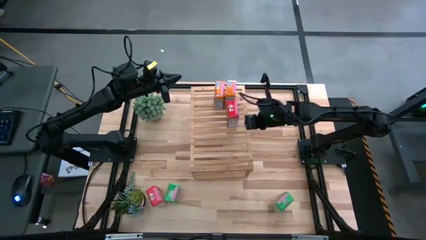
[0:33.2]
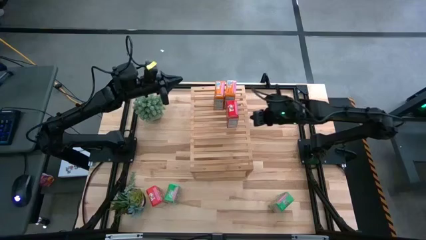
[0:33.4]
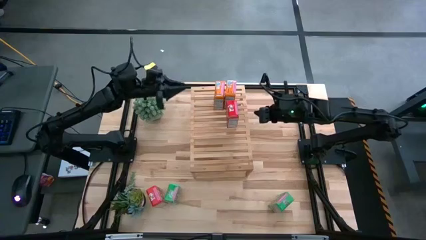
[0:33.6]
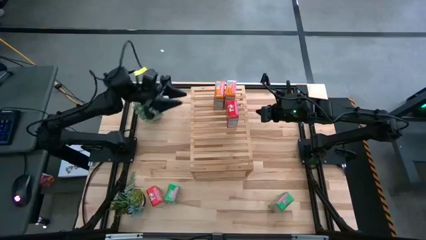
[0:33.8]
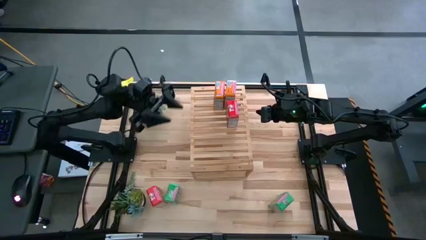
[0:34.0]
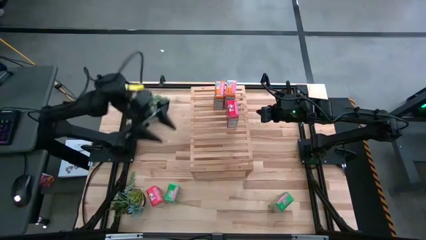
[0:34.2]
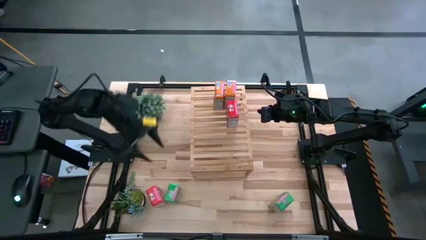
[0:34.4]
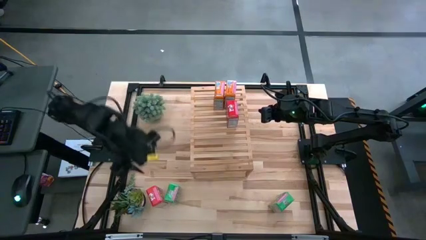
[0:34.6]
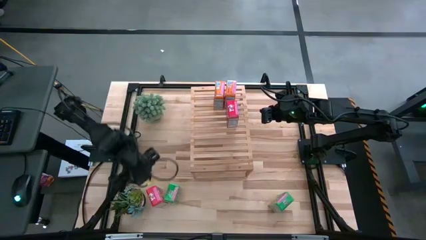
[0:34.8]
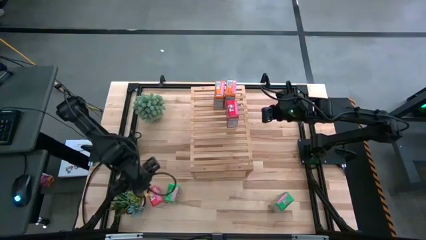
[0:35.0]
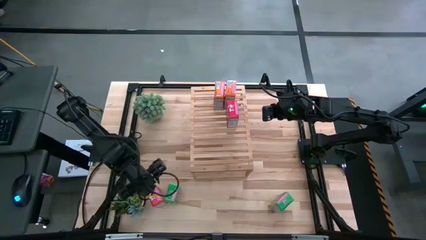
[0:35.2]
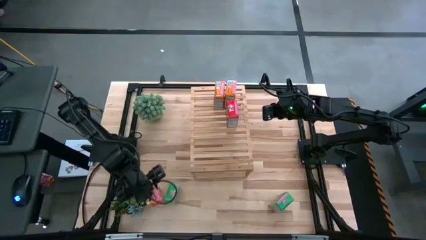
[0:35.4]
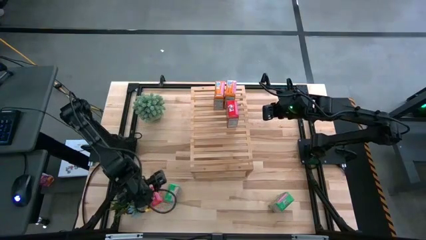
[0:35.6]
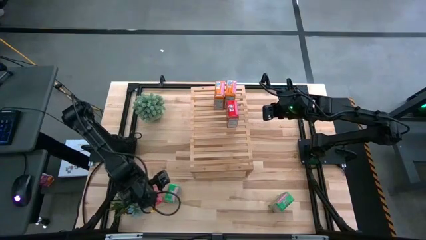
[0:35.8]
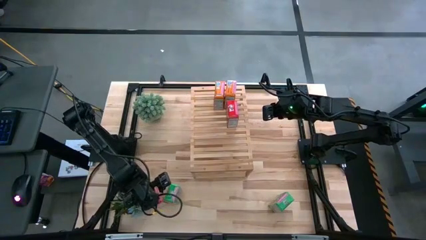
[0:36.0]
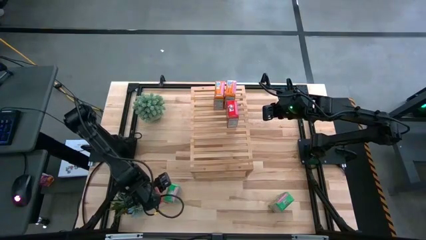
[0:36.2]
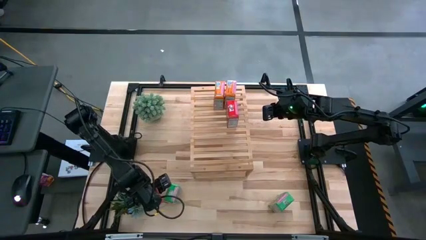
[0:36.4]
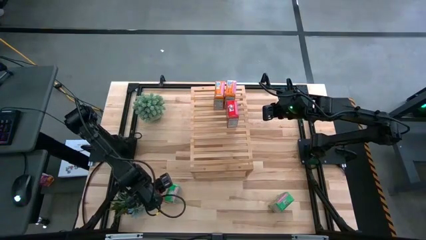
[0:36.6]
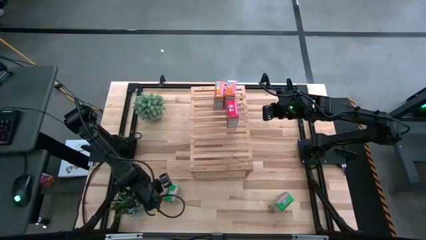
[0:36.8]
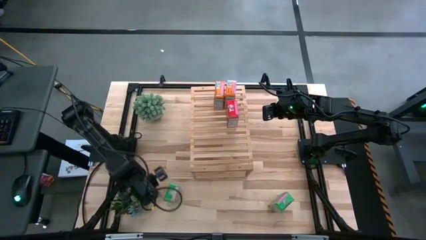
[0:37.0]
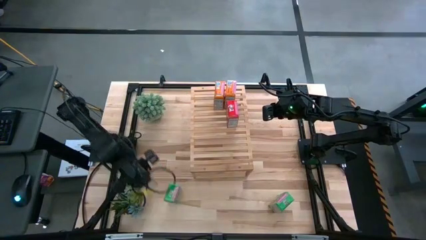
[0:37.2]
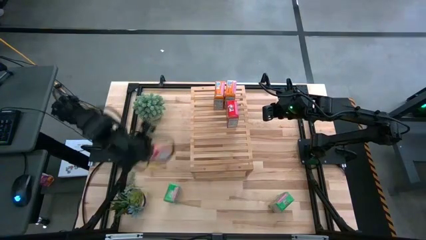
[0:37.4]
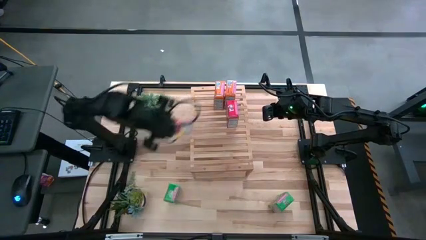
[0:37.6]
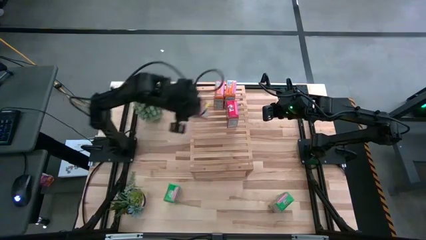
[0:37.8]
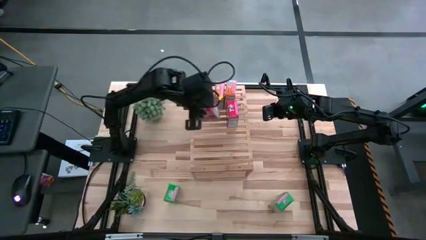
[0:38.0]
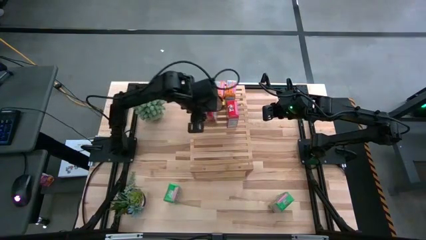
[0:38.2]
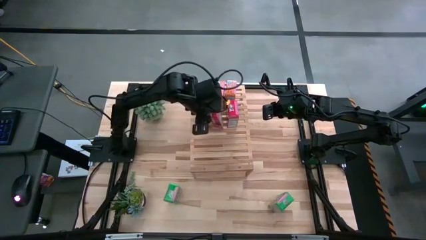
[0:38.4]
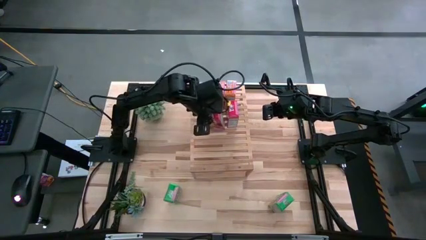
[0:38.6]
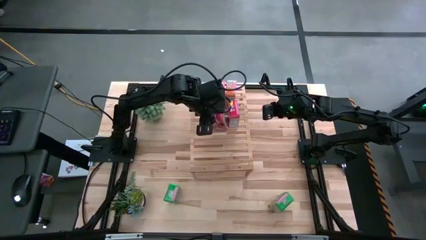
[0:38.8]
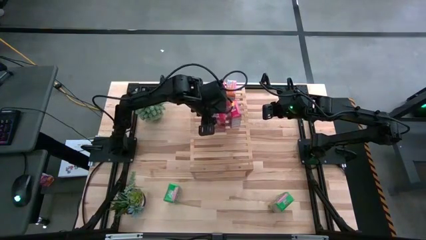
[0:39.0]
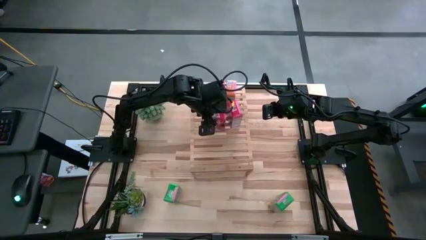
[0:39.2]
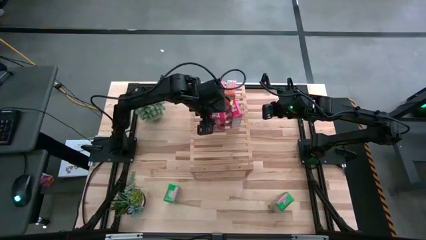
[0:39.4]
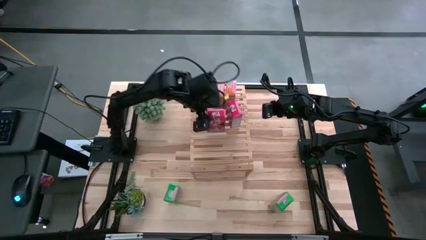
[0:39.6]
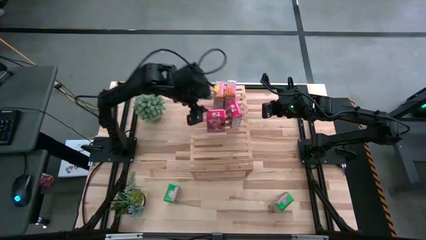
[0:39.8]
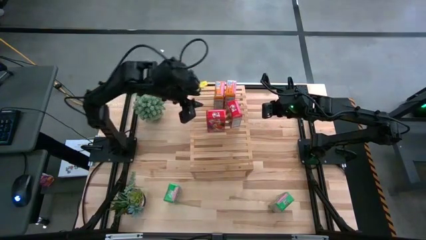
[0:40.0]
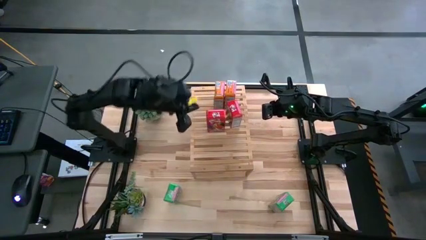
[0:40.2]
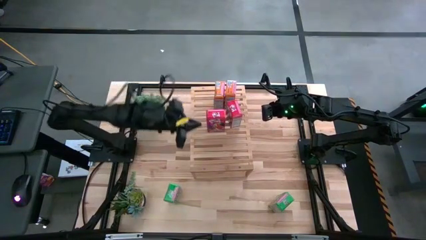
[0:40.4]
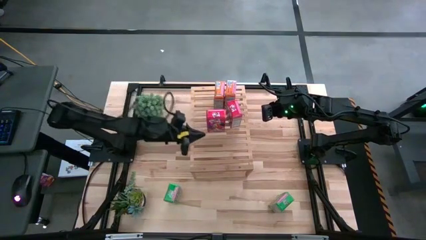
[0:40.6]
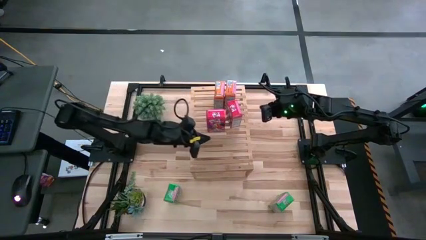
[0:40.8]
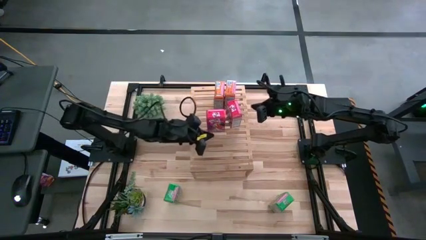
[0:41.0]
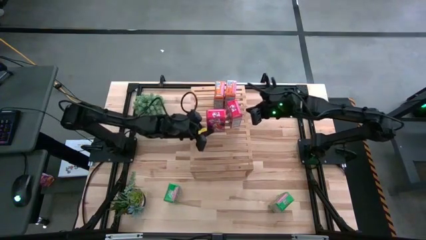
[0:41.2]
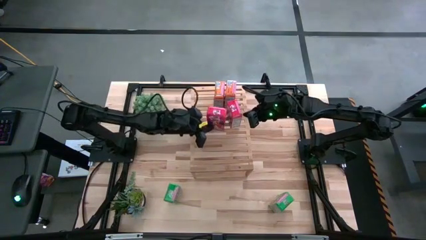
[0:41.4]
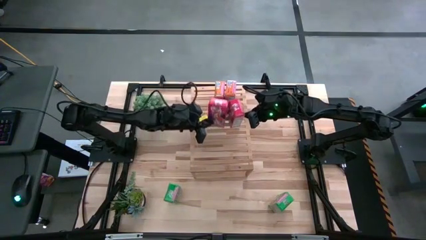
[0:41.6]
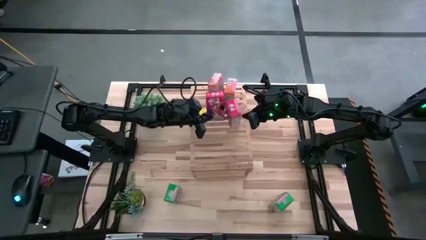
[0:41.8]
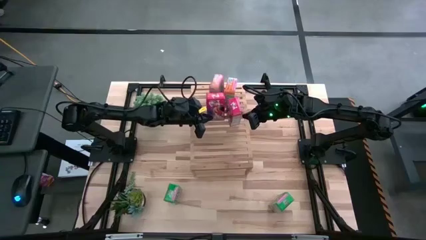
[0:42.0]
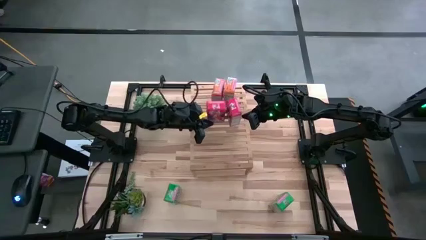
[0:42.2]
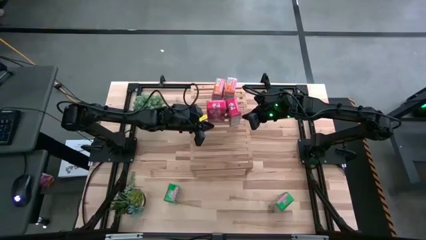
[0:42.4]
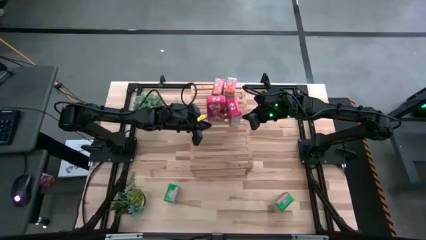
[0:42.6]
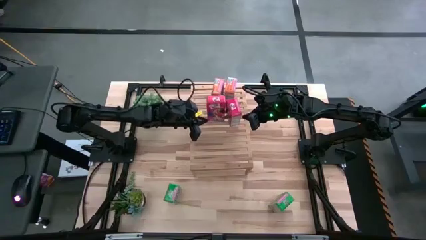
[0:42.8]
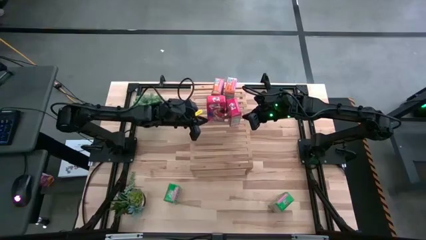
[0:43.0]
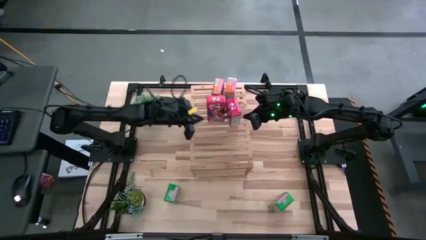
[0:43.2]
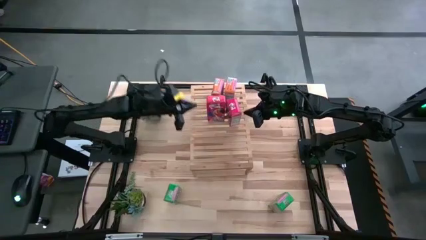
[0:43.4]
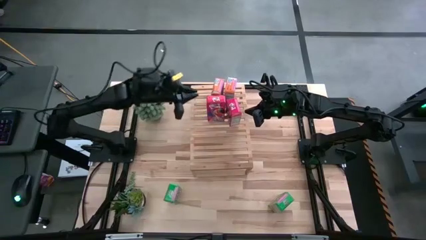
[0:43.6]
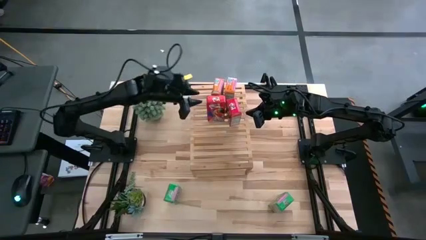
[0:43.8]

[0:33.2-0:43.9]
Task: Stack cereal on shelf
Put the red cereal box aligned with the other red cereal box on the shelf
